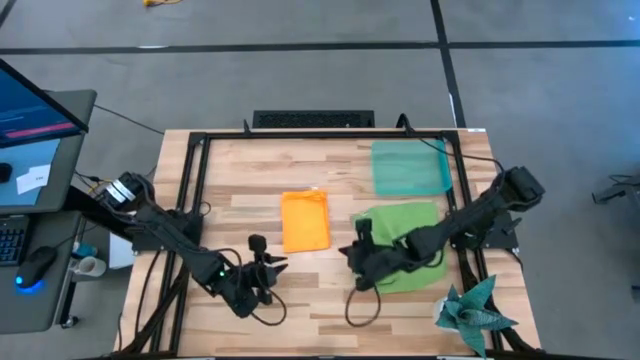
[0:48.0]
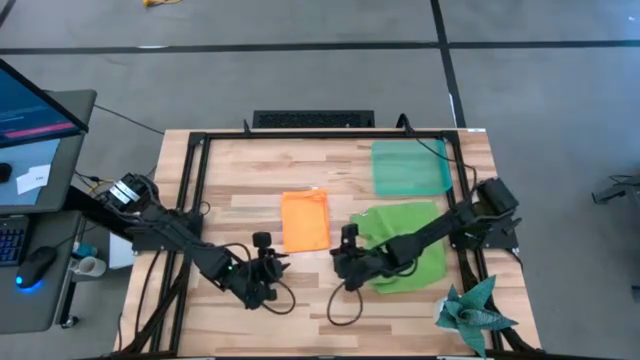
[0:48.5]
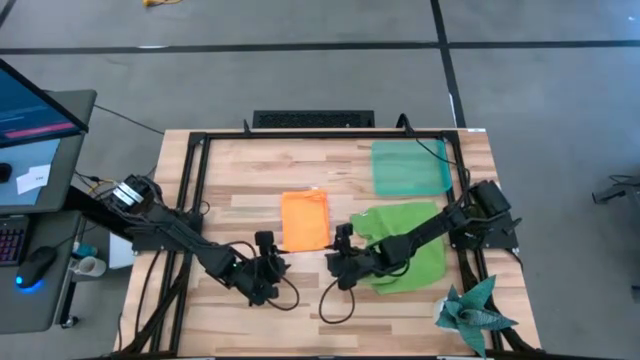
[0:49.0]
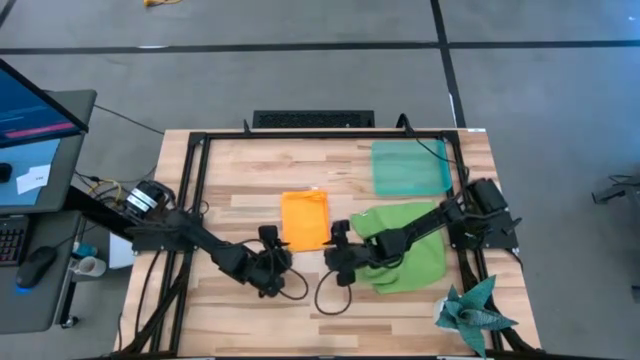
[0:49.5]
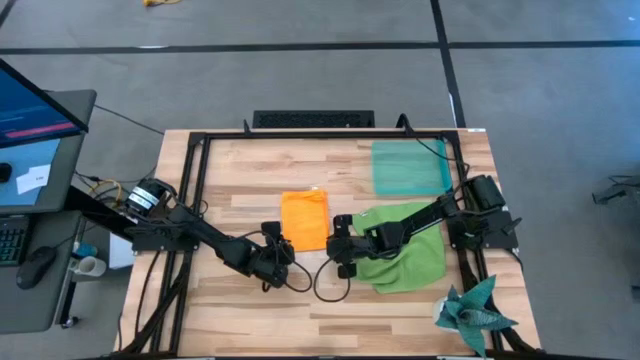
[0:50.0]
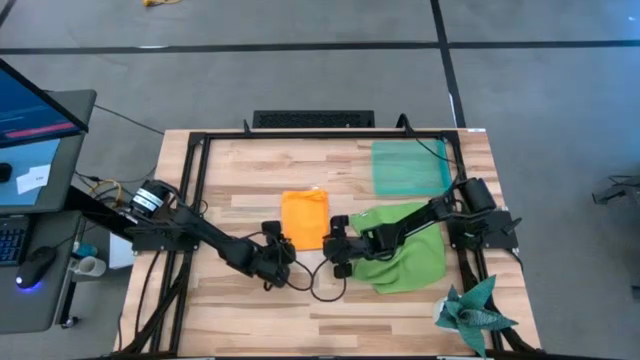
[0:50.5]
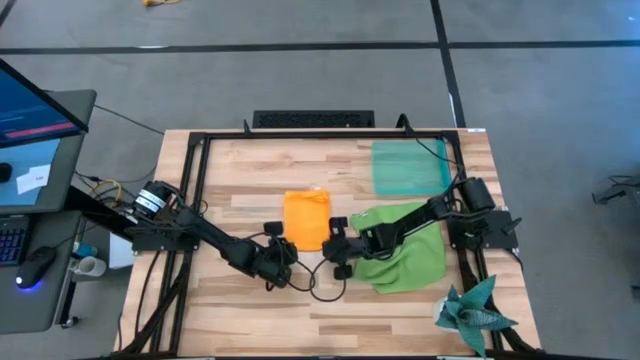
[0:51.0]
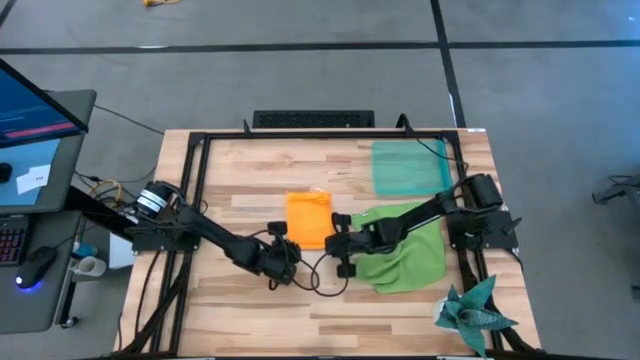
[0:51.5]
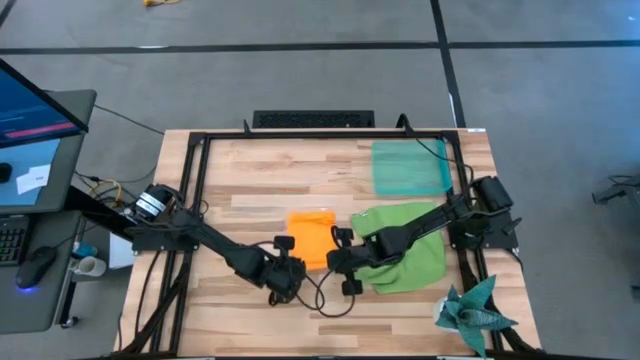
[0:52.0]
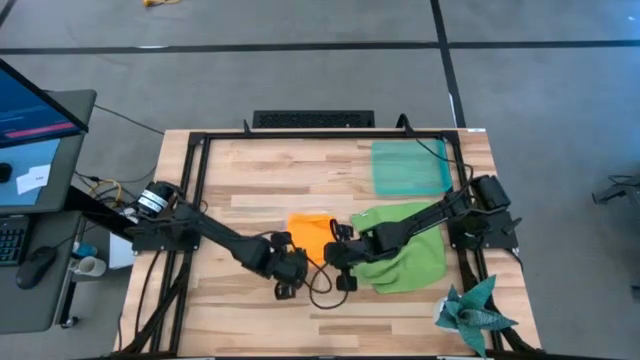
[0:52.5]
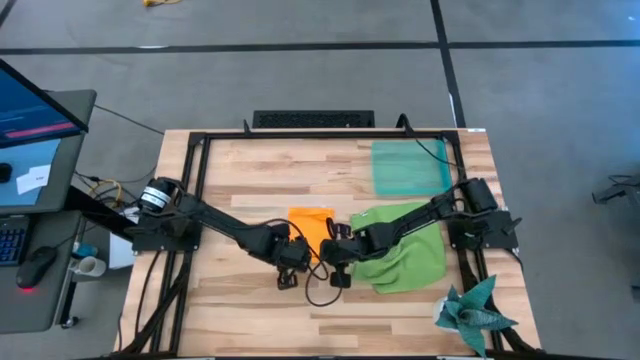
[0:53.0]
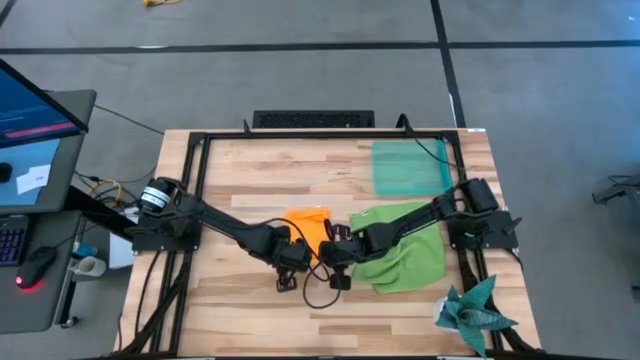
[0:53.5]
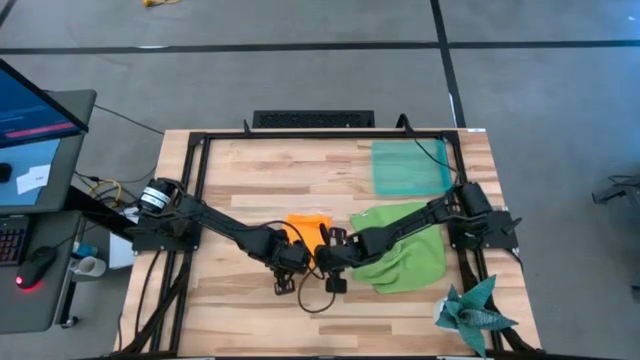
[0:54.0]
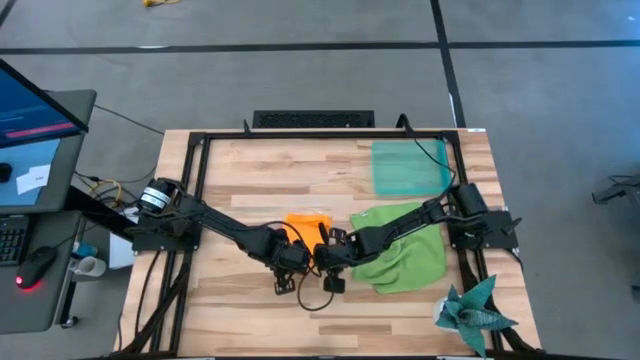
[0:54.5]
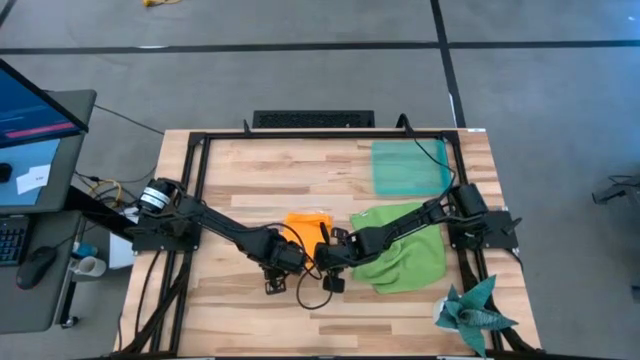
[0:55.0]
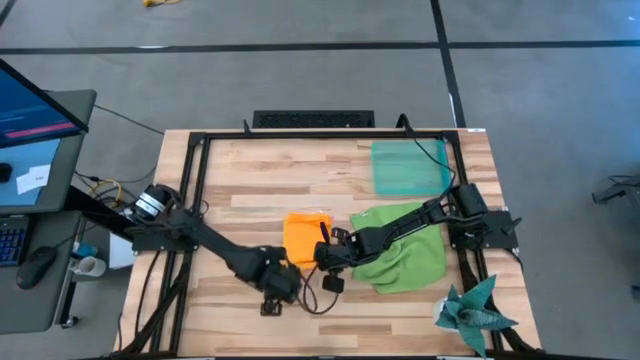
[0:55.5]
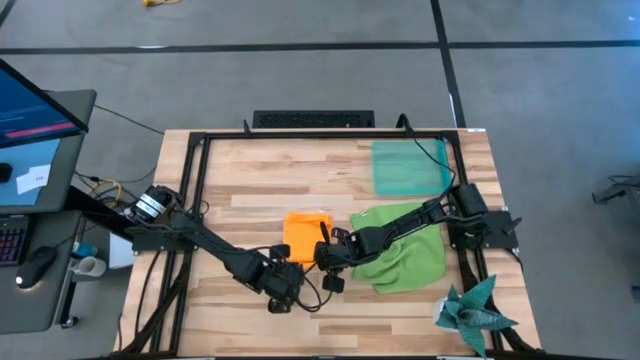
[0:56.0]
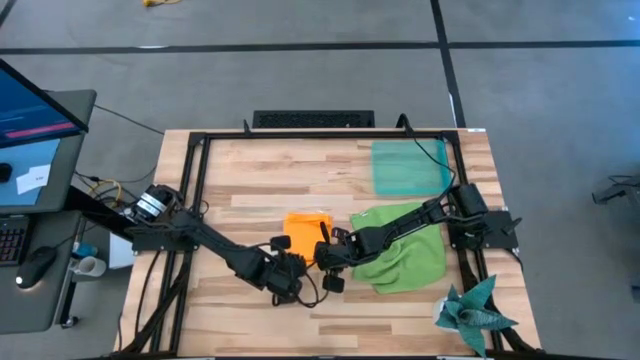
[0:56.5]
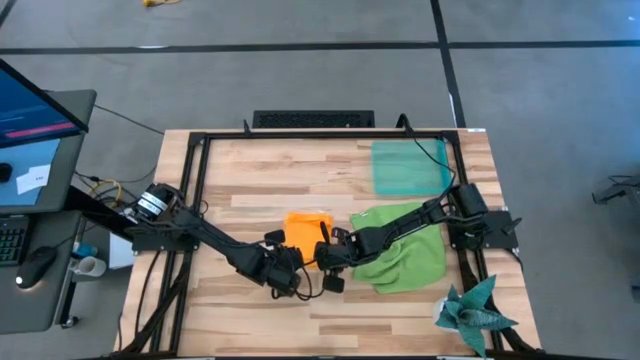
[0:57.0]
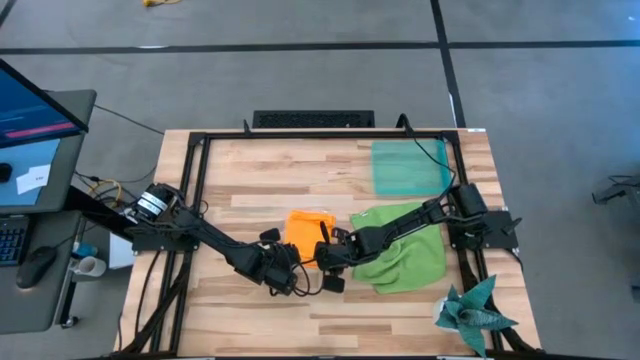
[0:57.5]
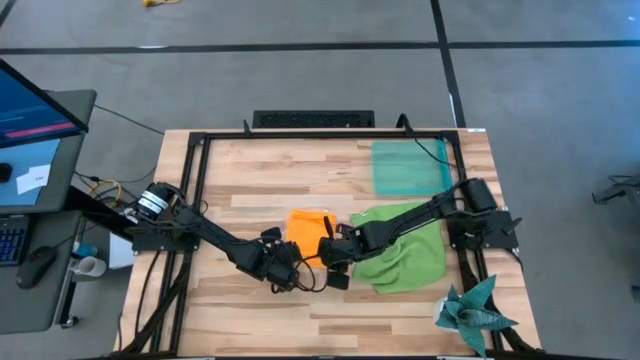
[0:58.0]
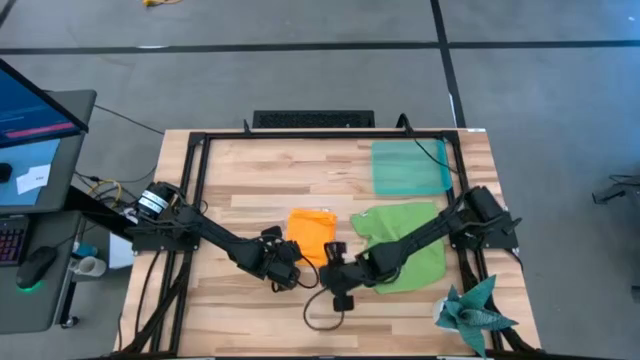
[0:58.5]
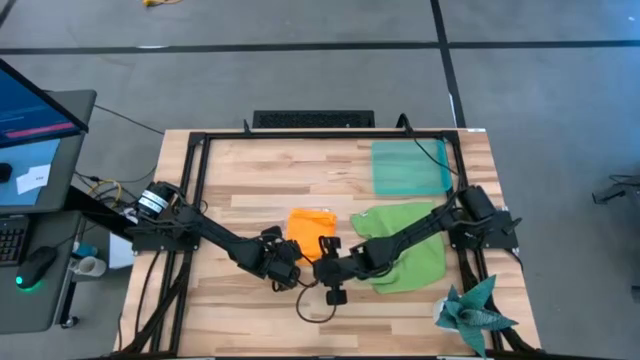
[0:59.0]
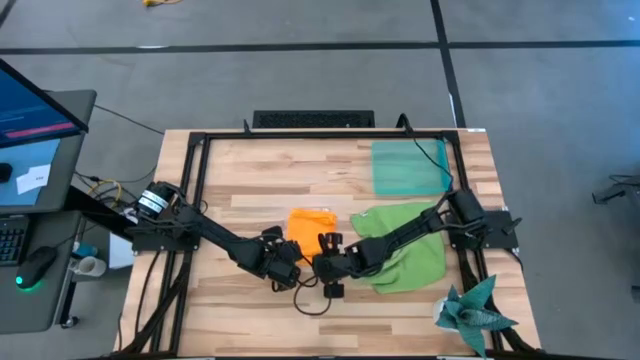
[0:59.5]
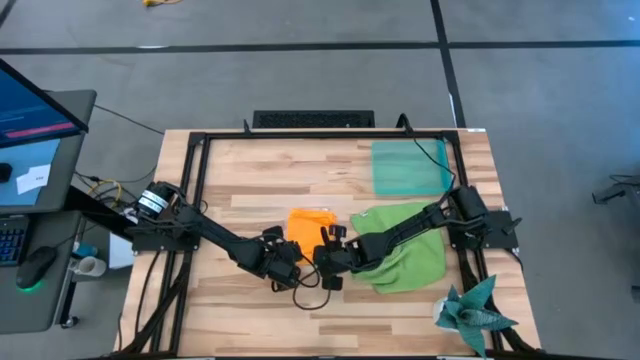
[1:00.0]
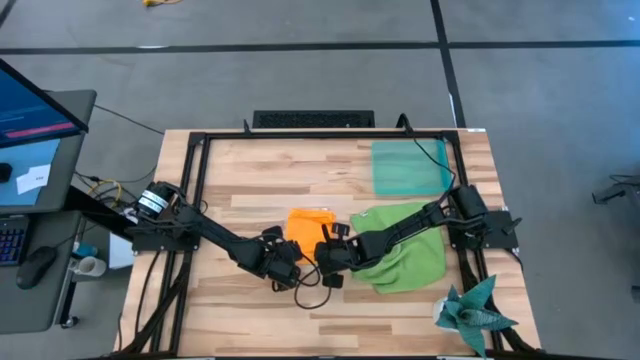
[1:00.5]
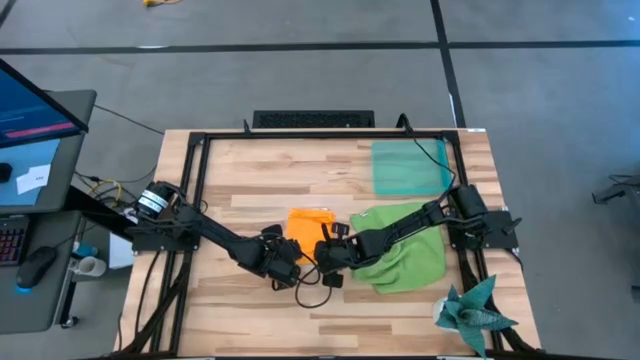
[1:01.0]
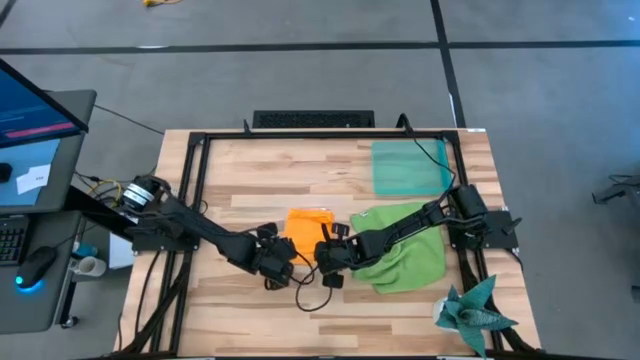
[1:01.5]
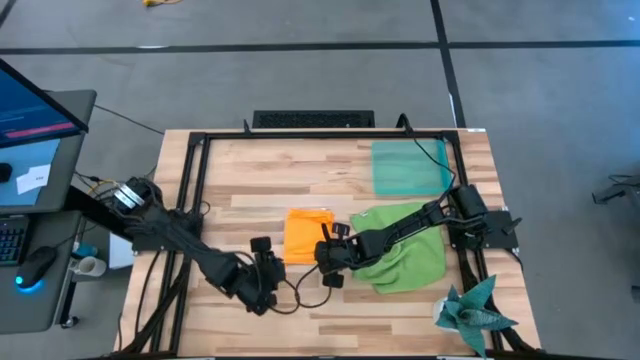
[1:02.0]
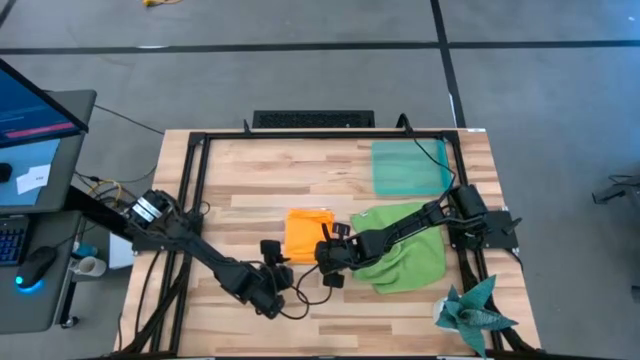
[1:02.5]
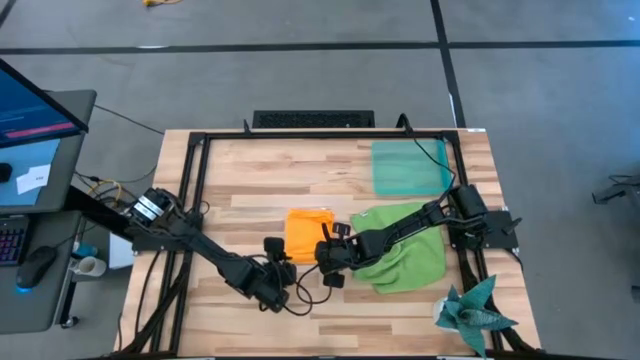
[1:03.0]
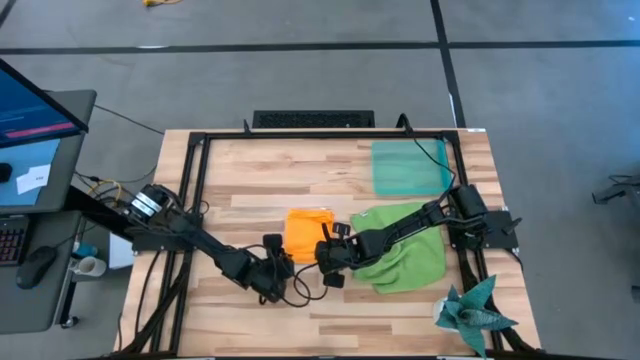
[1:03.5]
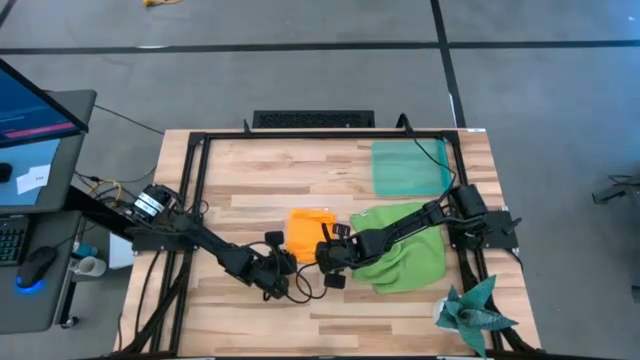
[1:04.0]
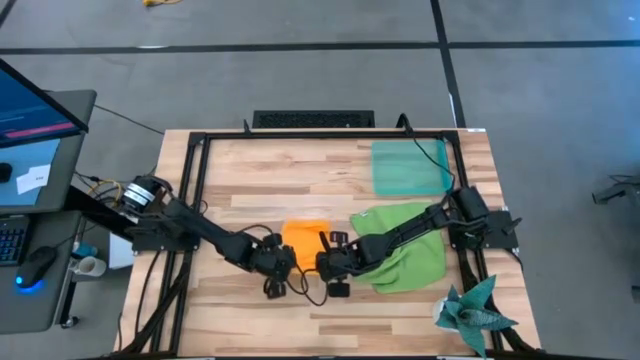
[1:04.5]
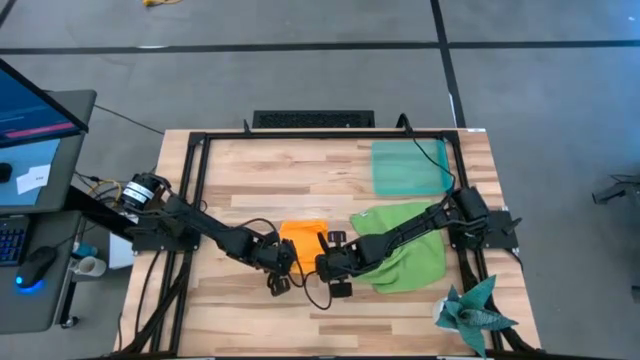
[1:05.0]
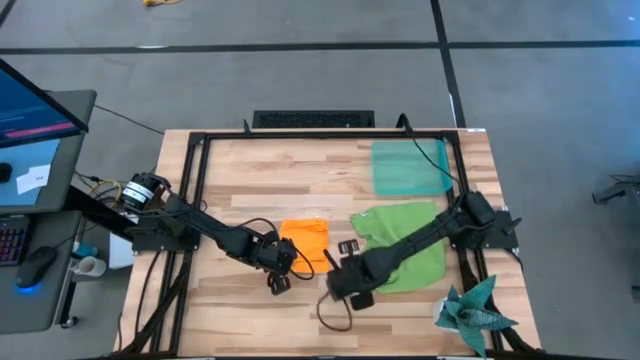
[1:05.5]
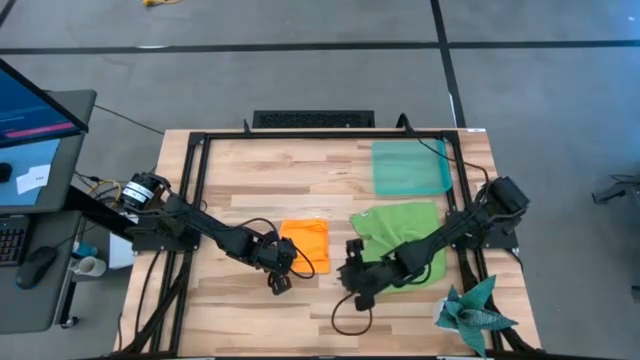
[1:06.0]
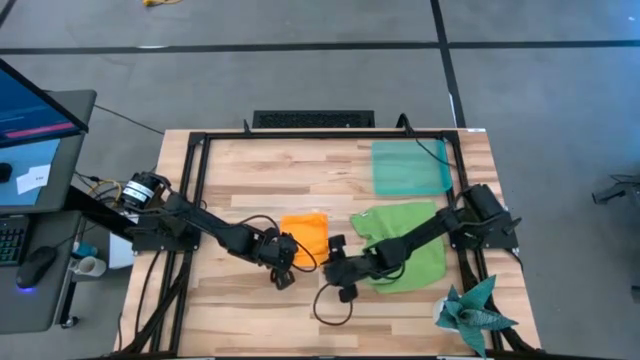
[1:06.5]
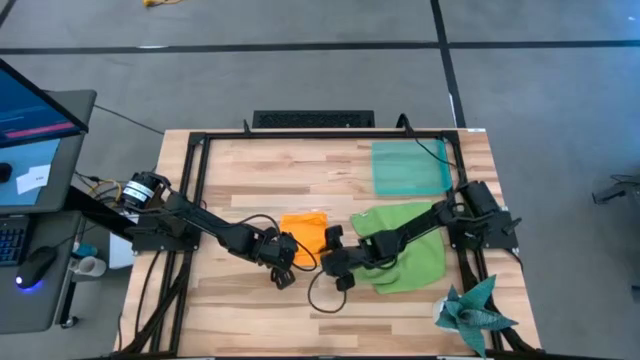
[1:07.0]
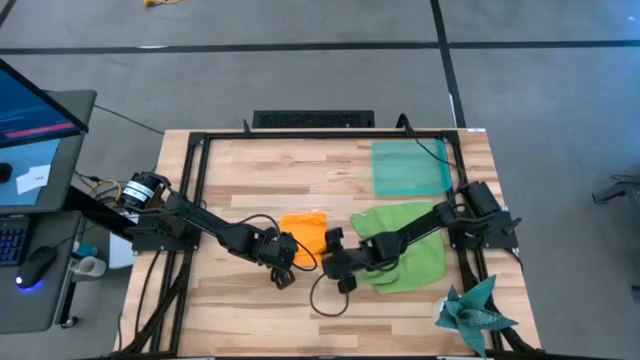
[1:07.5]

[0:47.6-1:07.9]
Task: Roll microfiber towels into tight, uniform cylinder then place into a basket
Roll the orange towel
